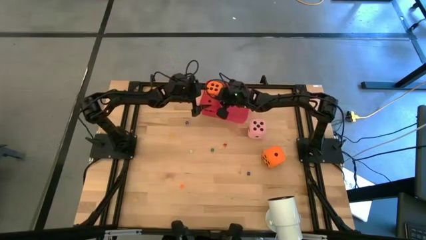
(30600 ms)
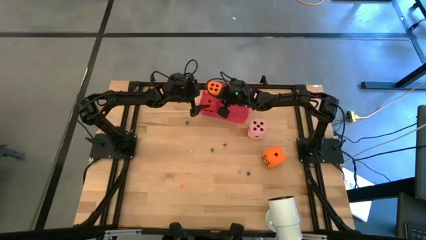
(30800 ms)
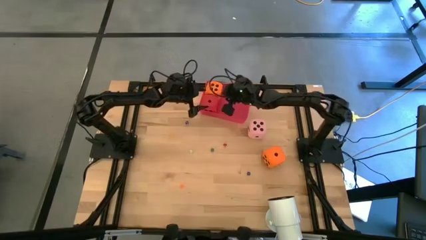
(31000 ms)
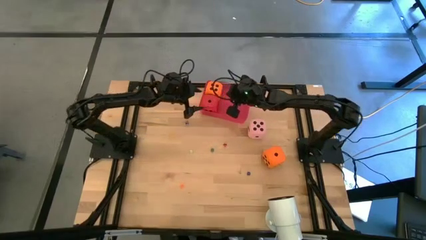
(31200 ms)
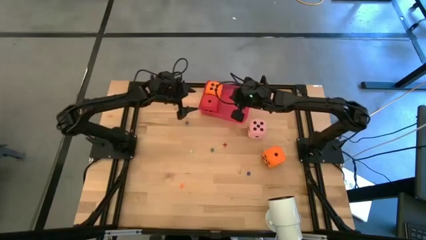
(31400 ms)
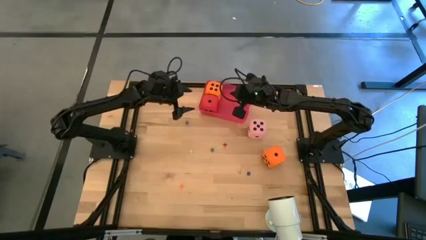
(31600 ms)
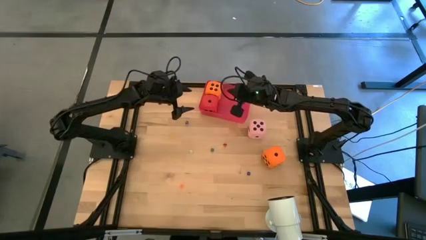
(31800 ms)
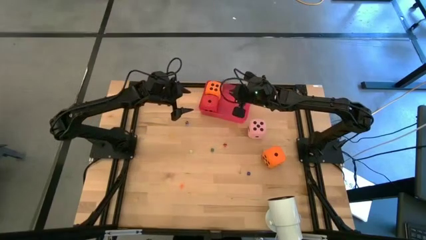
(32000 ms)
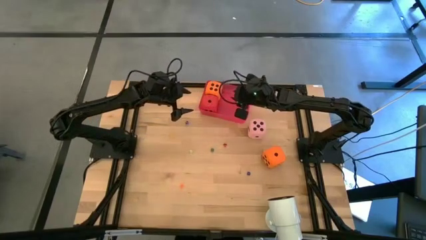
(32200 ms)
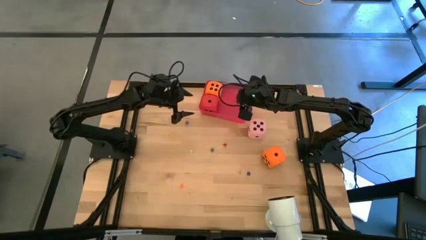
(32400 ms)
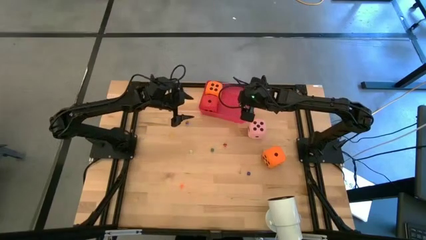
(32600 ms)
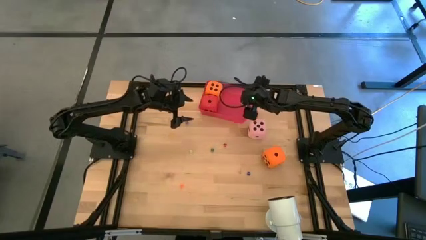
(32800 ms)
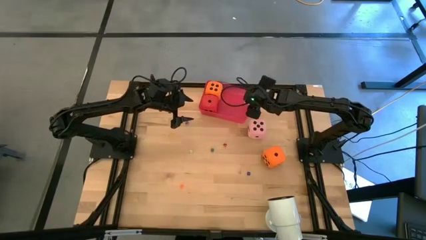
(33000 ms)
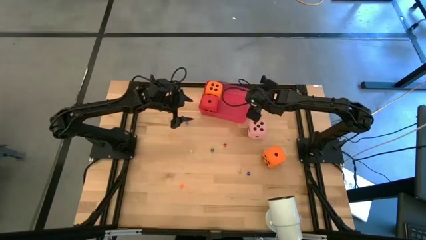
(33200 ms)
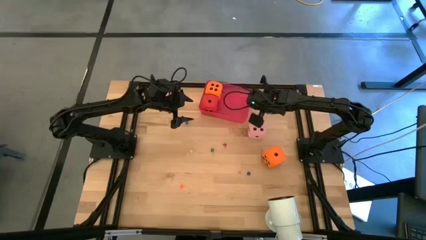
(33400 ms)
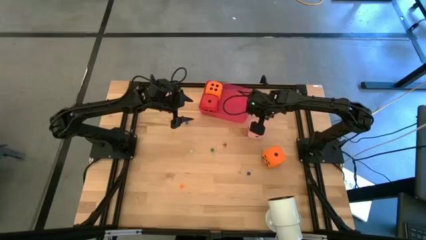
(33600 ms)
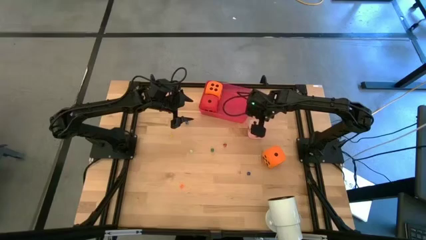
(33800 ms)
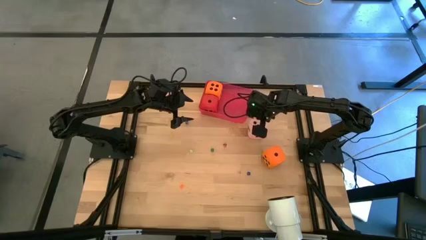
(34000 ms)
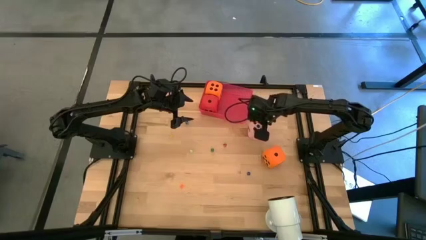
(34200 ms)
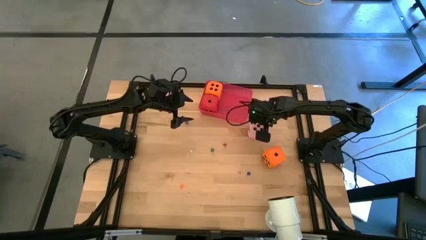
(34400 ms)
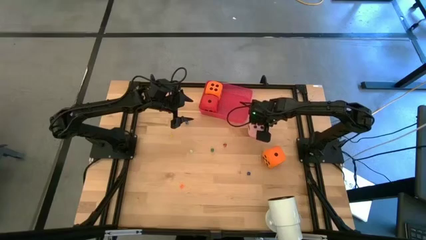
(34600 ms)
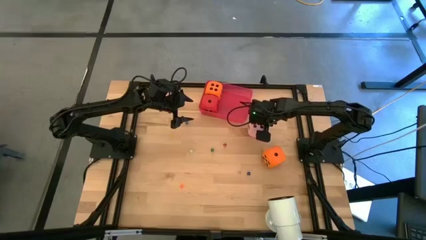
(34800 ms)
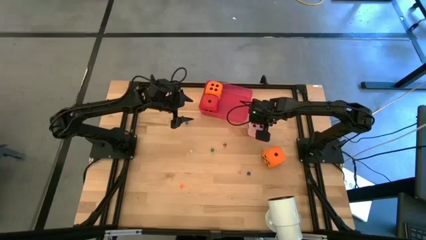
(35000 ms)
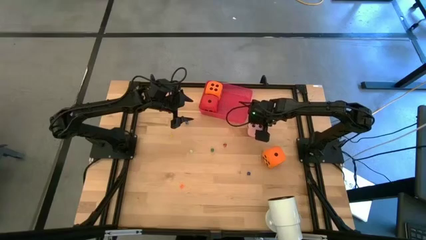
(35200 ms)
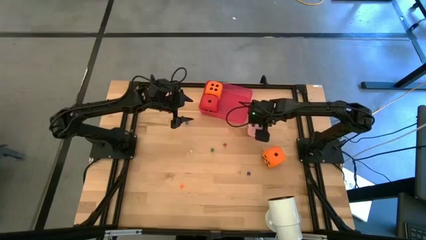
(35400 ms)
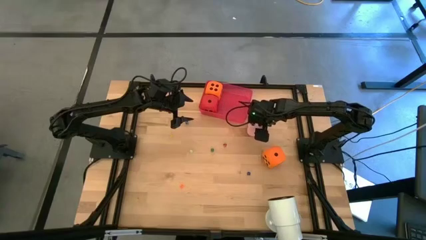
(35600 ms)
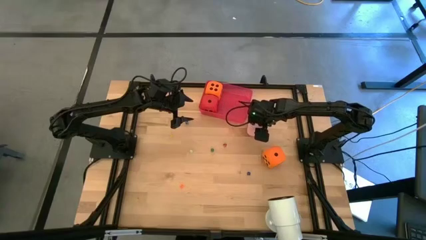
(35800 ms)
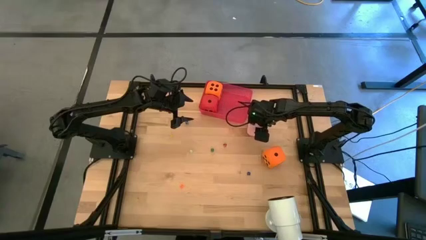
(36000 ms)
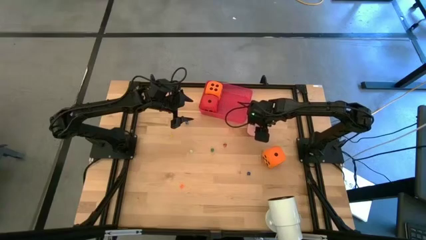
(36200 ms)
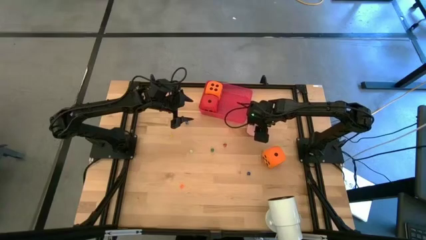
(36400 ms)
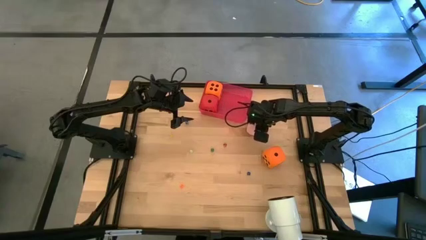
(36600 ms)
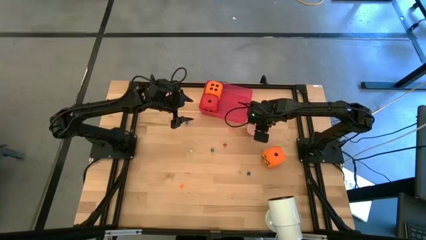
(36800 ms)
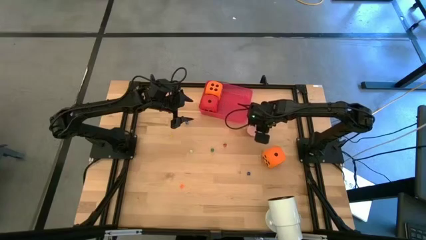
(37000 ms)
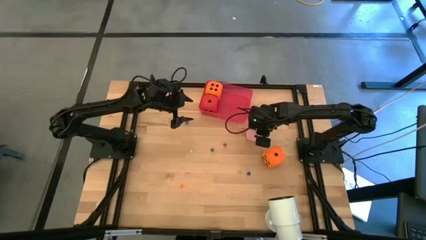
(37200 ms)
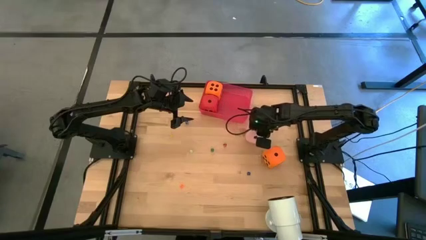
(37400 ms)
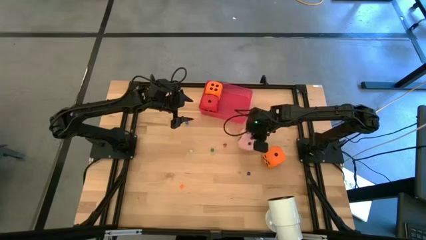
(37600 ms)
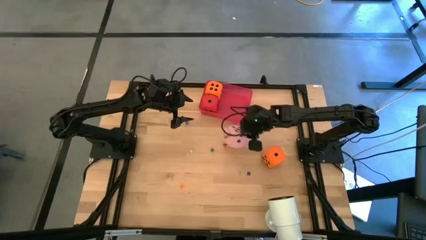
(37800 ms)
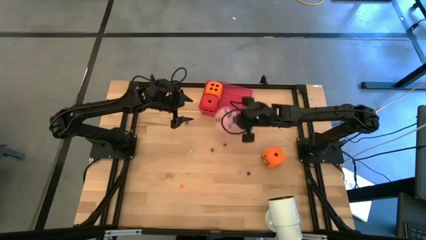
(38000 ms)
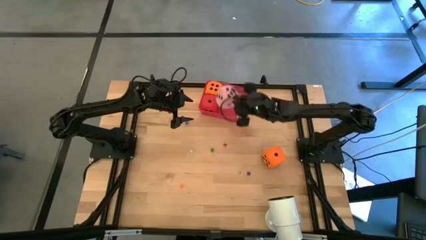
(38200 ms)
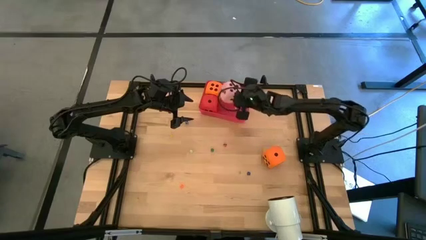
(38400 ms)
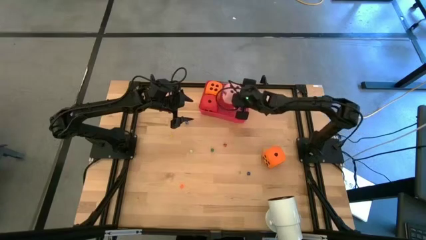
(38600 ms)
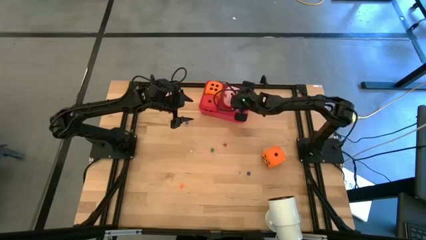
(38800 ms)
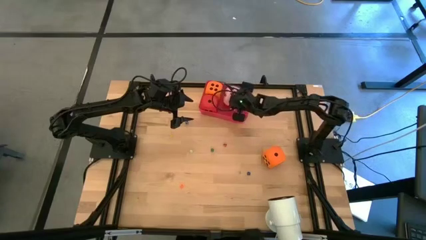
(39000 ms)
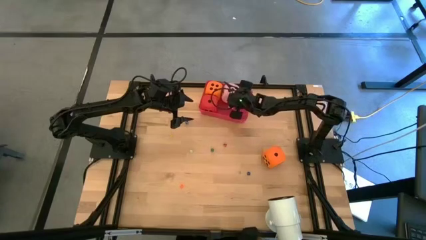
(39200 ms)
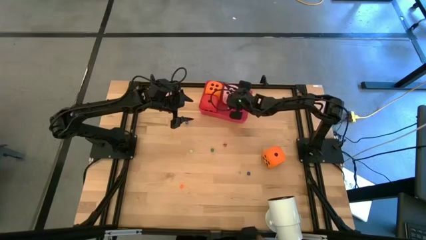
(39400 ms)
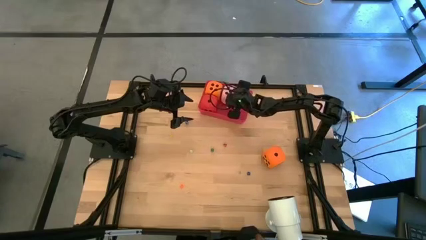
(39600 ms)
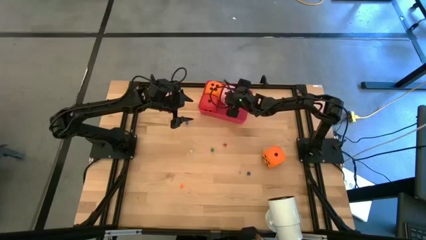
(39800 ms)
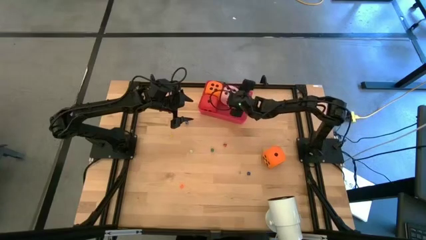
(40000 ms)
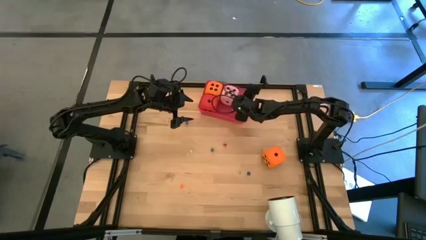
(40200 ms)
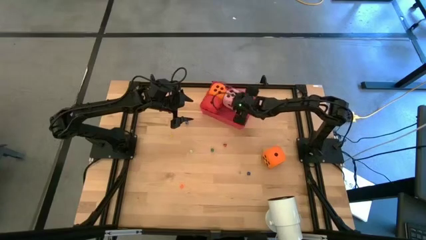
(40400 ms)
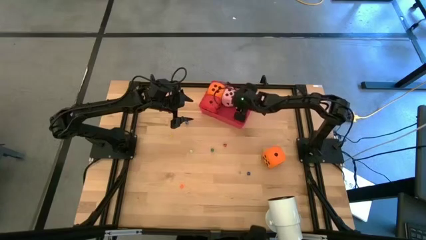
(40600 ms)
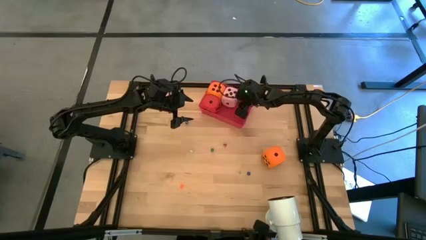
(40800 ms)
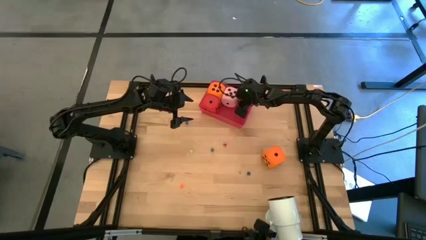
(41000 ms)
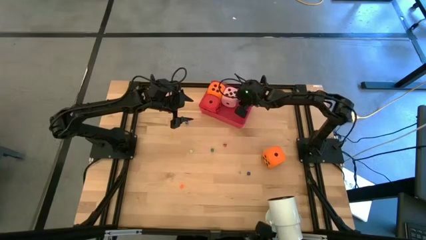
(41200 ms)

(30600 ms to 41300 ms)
Task: Pick & Place Dice
Put the large pink die into the red bin

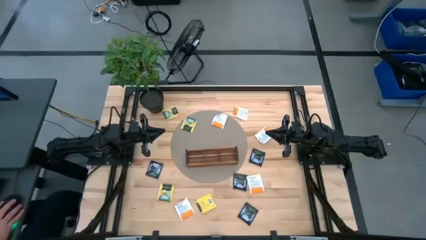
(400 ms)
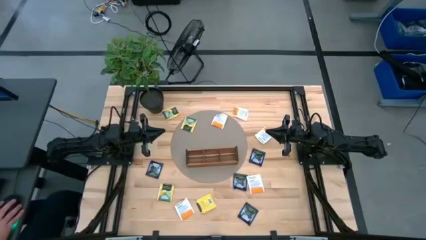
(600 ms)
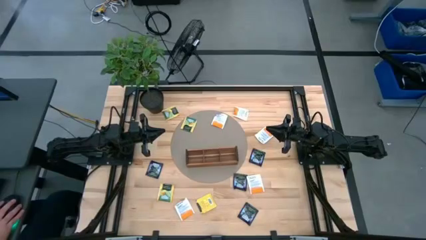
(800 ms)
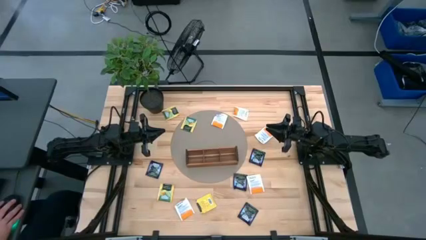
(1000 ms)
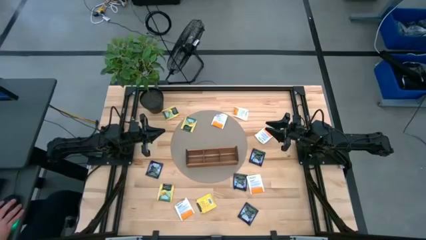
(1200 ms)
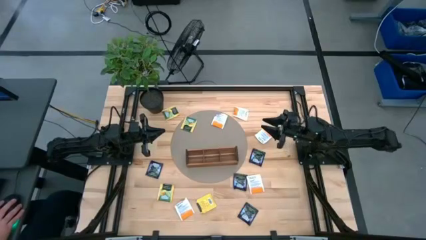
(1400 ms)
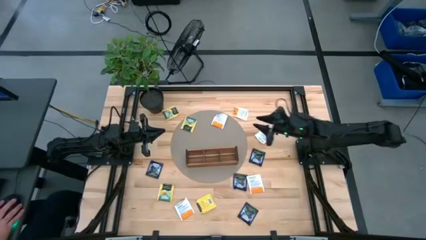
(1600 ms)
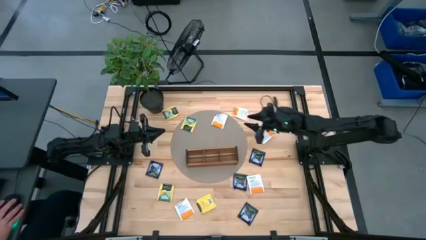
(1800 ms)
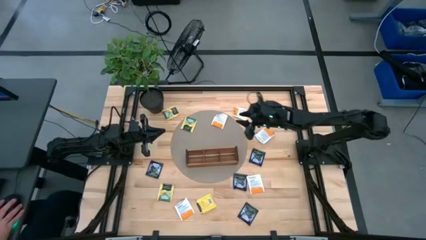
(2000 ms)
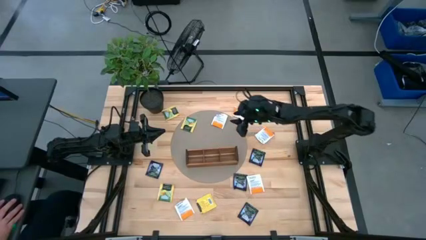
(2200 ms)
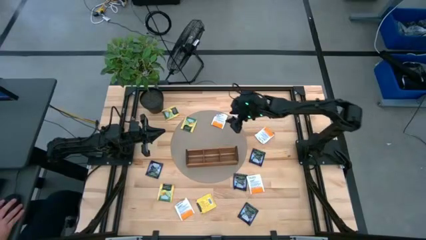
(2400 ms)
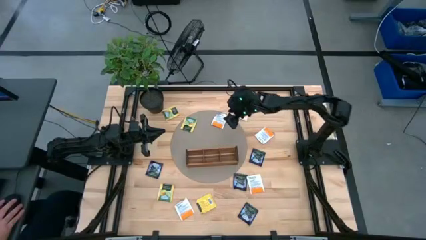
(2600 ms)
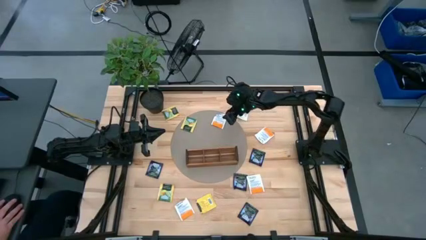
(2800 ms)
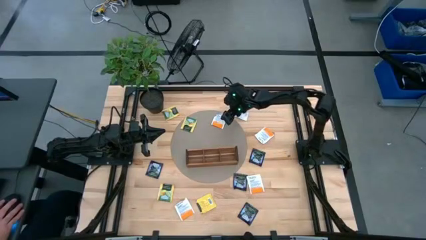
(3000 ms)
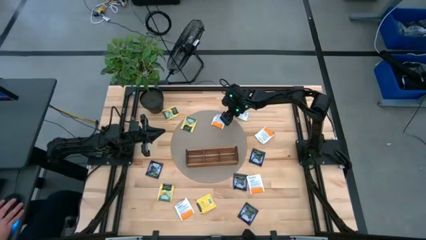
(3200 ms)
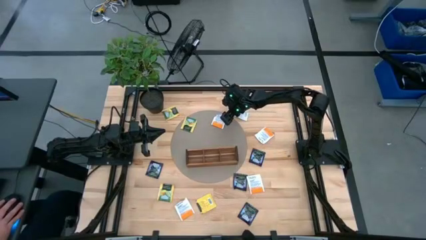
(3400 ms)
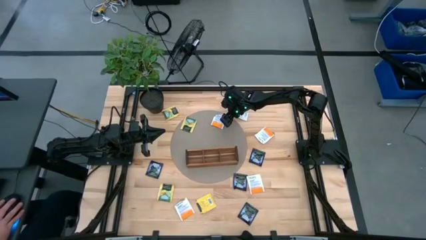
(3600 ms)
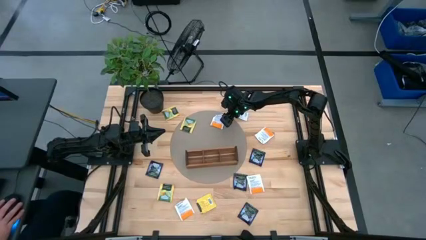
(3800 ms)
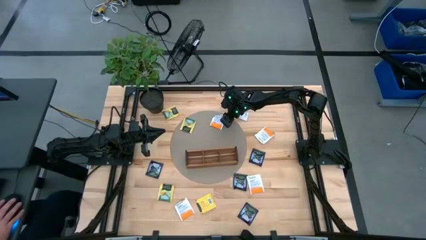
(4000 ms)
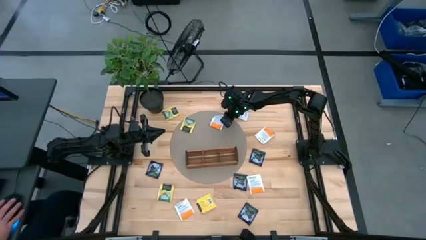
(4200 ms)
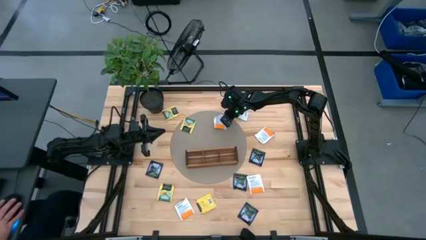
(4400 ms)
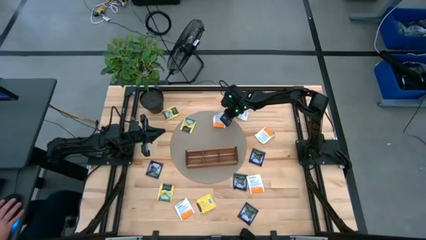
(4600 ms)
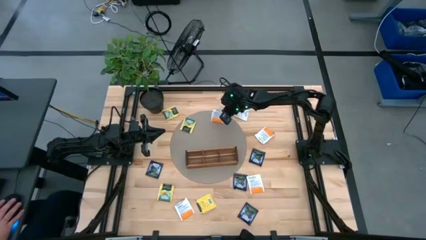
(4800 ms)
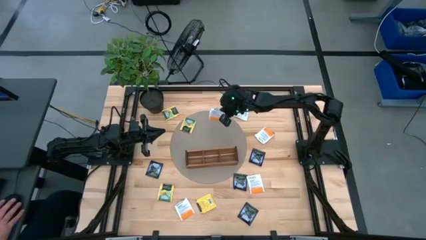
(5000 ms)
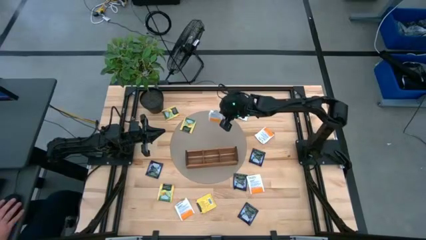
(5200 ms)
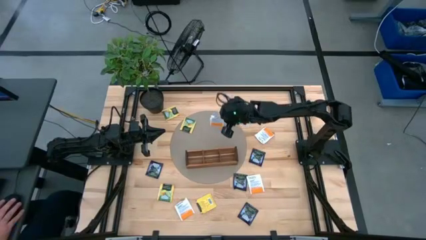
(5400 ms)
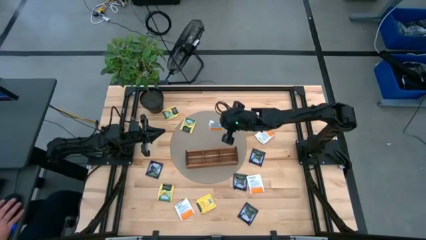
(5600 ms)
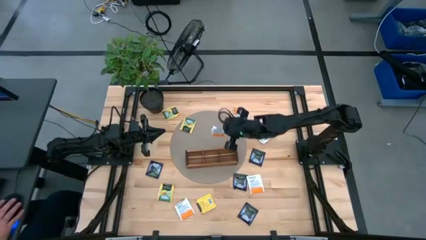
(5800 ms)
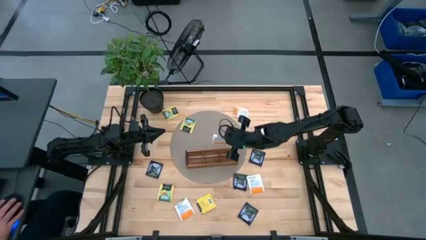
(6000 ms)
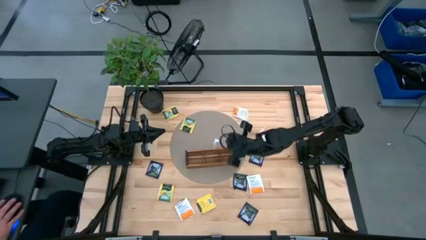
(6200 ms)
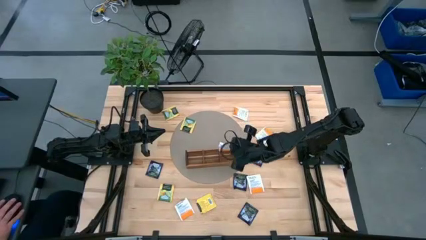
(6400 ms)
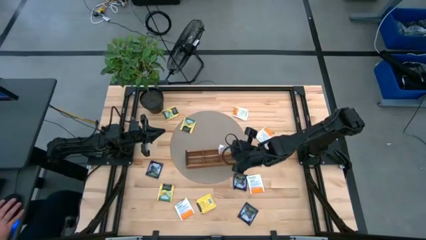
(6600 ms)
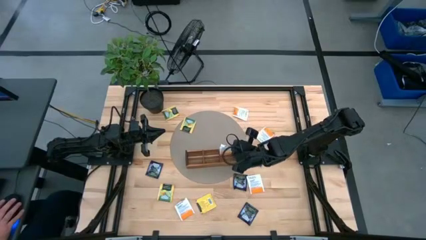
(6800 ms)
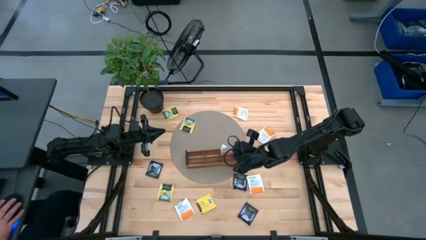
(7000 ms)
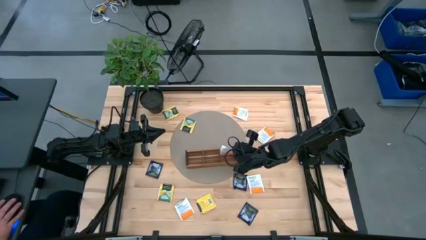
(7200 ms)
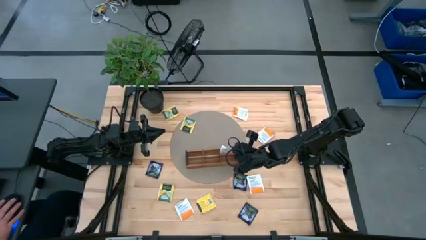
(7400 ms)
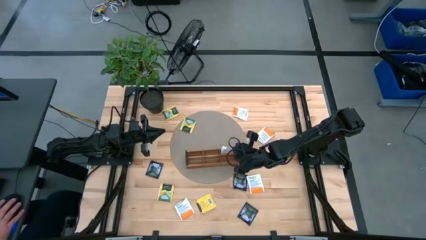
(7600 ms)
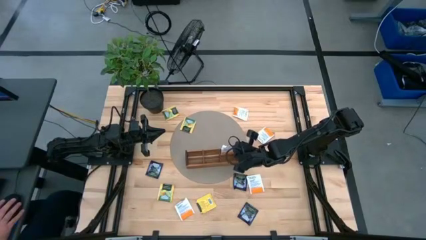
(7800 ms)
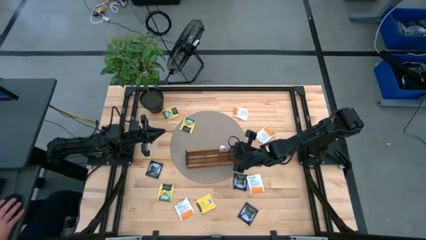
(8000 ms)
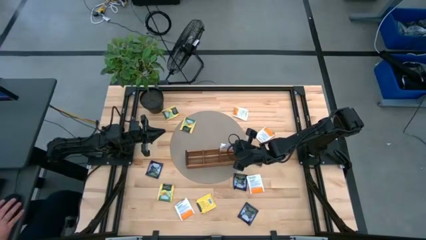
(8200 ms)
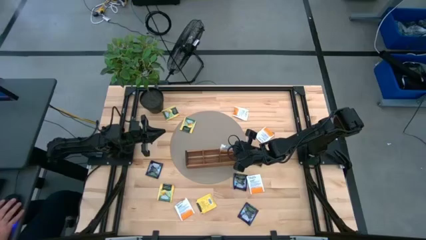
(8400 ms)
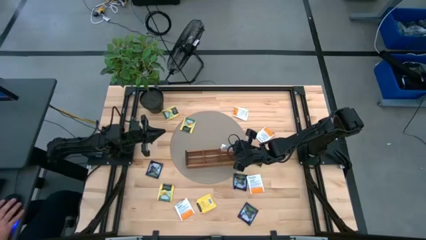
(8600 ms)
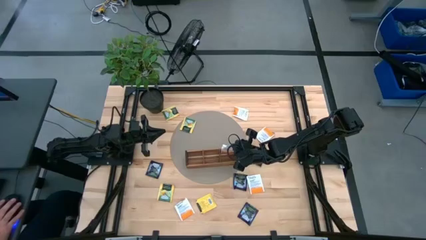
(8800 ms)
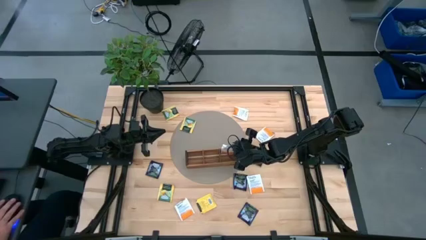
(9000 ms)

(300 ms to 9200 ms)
Task: Pick & Place Tea
Put the white tea bag into the right section of the wooden organizer
